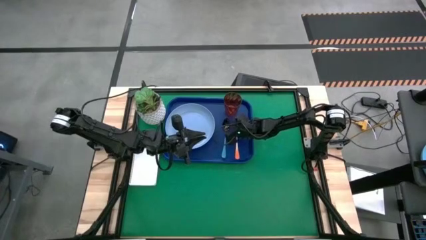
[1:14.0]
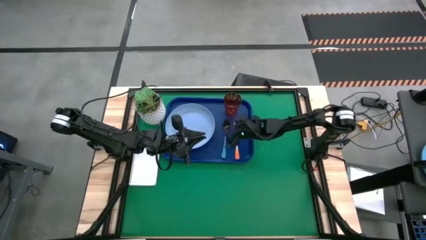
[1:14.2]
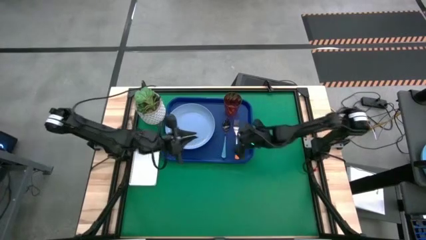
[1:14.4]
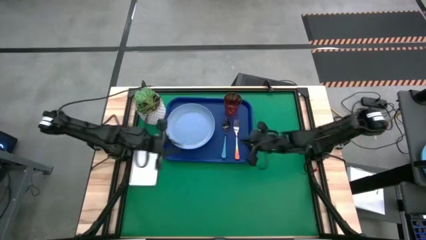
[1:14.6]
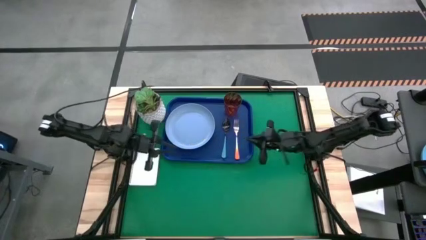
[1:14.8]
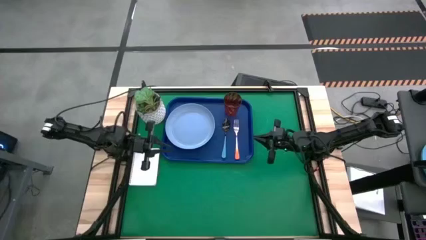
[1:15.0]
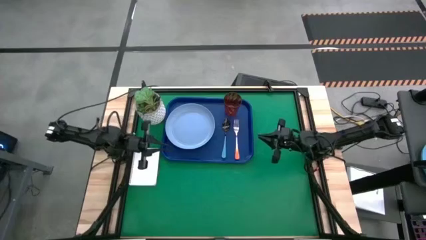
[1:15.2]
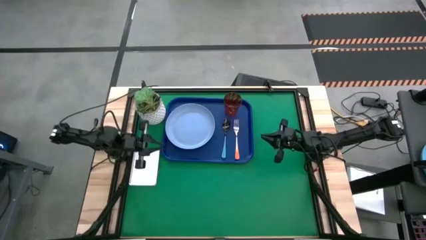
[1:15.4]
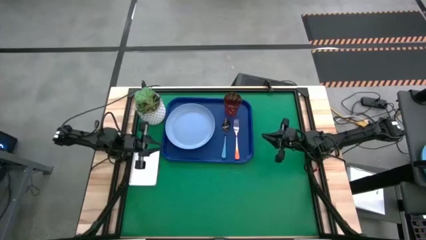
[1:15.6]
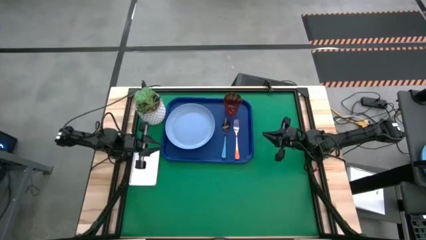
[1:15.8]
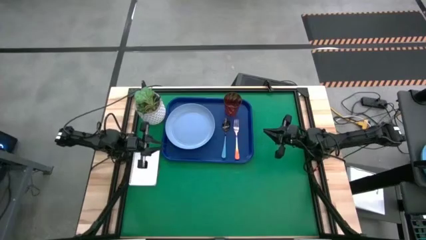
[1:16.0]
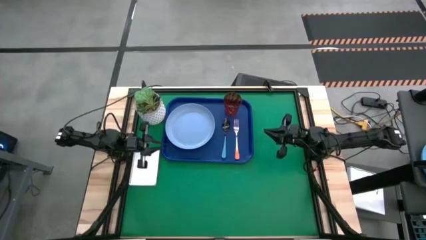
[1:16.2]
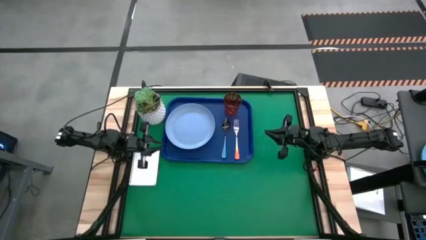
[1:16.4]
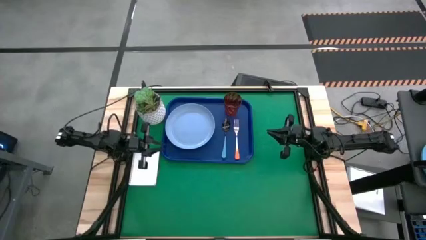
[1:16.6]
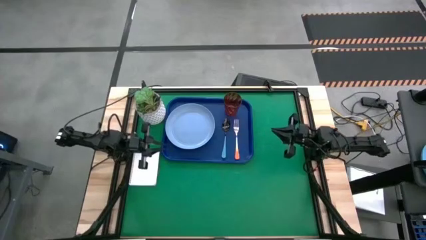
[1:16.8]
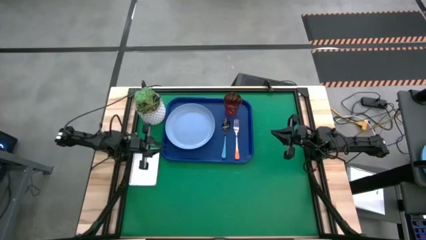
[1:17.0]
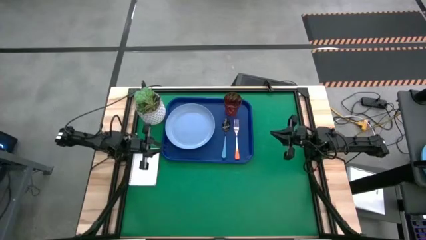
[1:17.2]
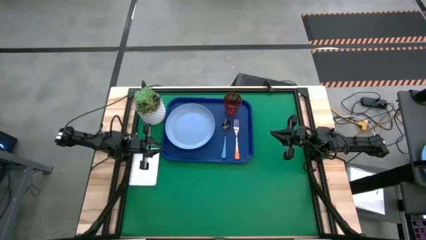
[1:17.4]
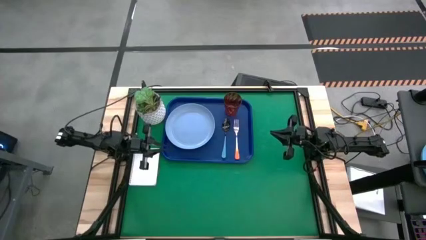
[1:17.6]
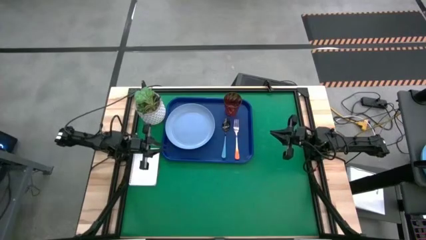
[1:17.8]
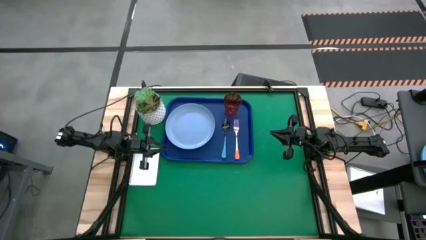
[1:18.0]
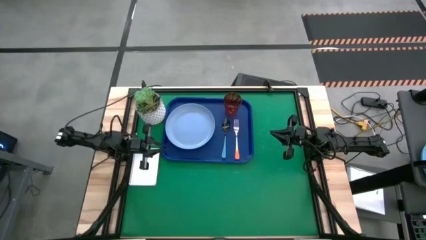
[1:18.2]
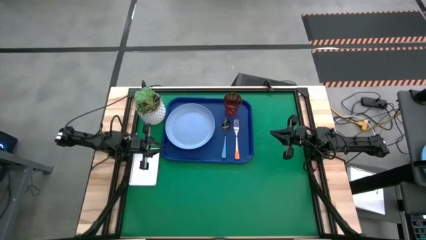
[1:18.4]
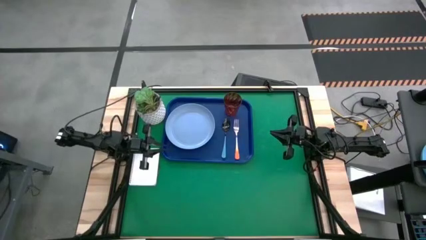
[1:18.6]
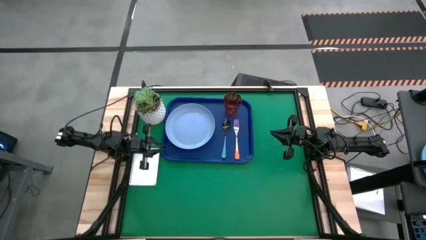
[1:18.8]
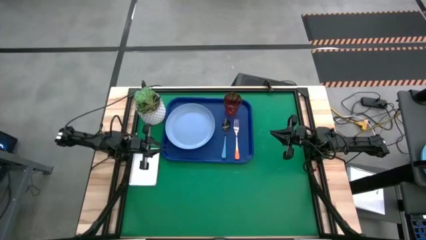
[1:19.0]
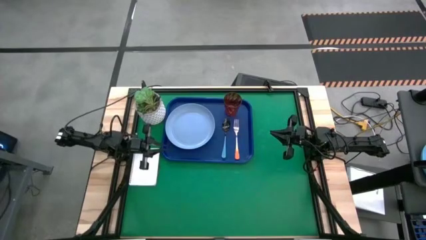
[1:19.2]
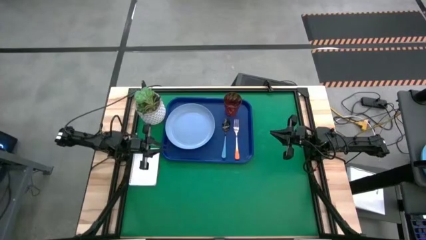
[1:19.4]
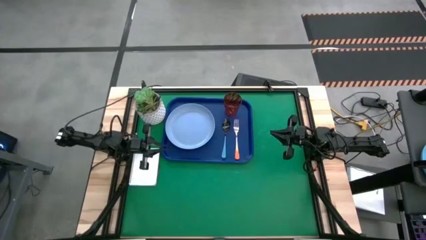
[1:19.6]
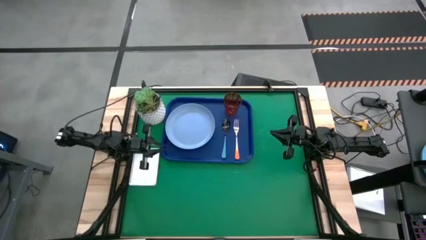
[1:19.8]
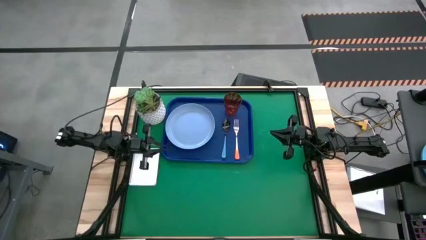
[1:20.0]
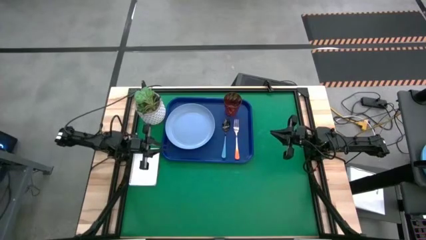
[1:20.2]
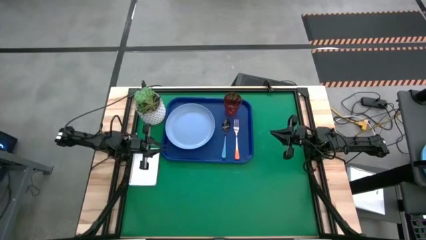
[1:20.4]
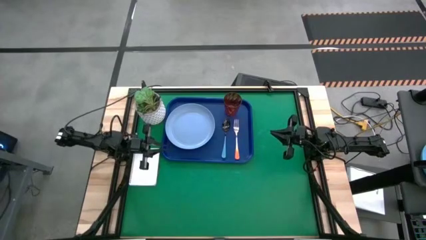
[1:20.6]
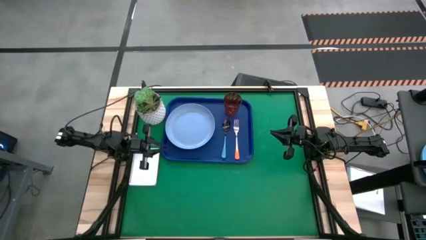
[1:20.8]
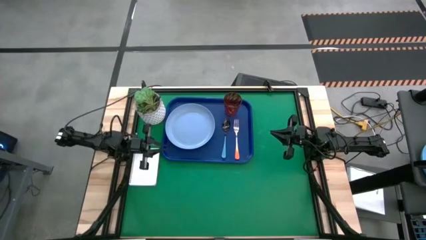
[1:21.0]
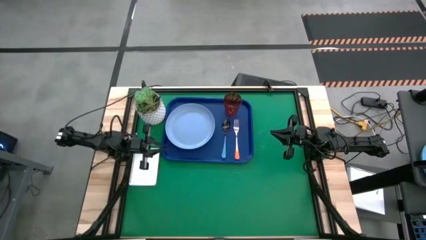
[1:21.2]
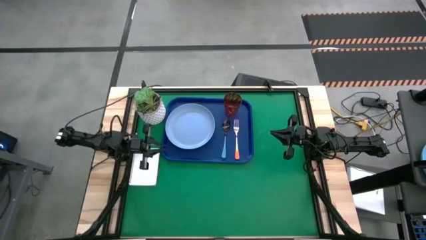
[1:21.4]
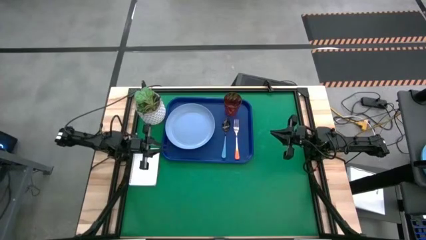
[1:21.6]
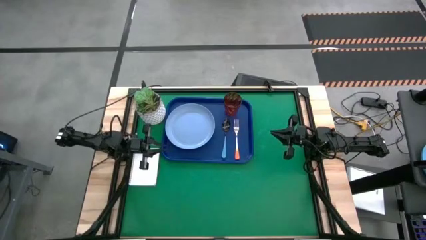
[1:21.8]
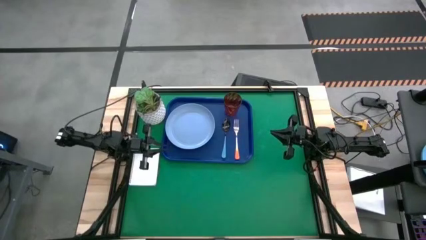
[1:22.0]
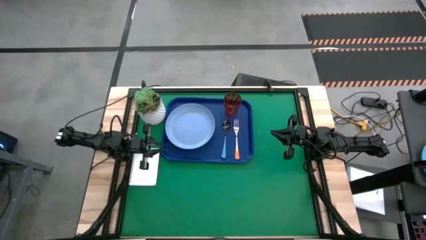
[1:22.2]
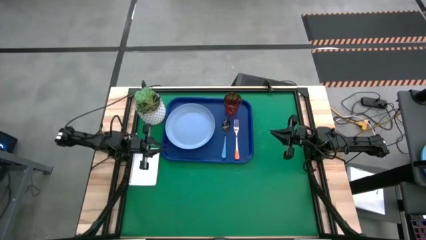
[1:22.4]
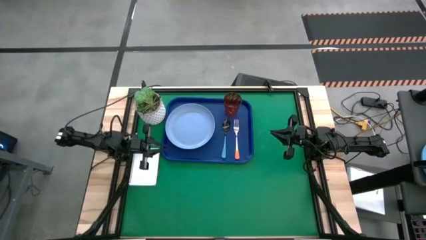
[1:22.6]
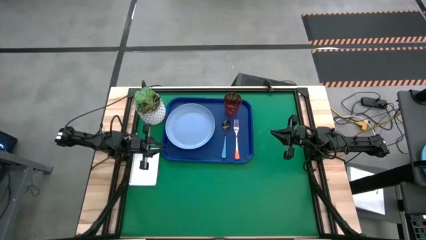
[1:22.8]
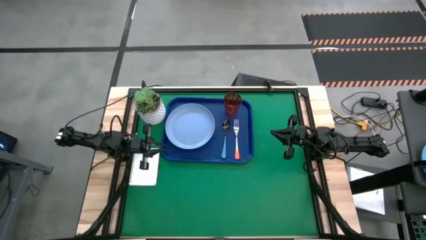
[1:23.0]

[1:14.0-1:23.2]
Task: Pick and place plate/cup/fork/spoon on tray
Return to Home Position

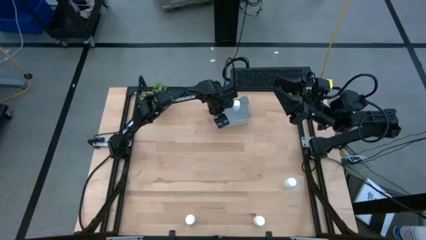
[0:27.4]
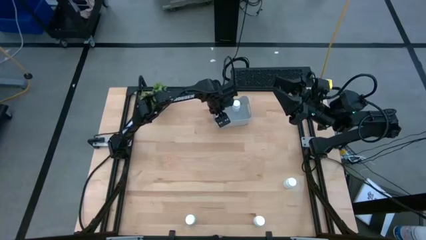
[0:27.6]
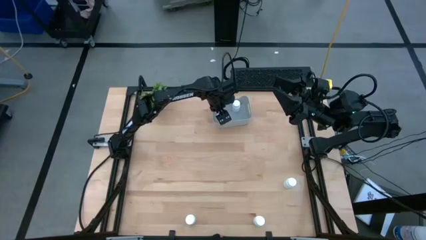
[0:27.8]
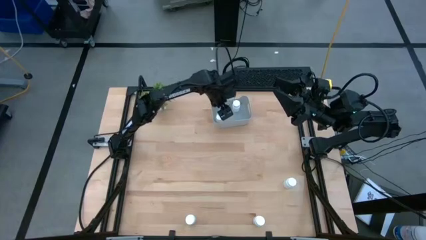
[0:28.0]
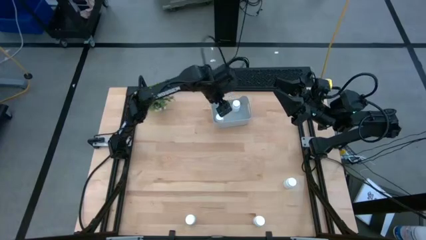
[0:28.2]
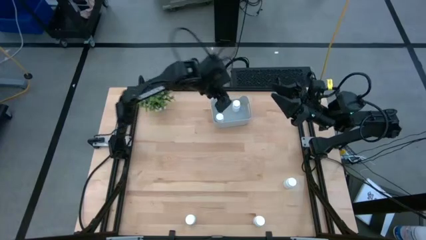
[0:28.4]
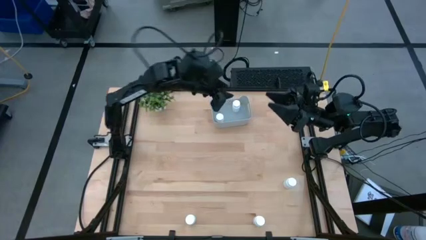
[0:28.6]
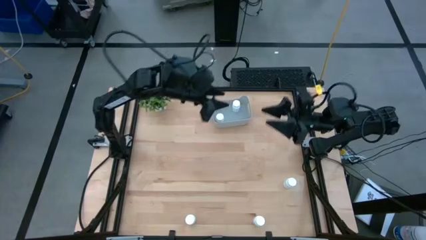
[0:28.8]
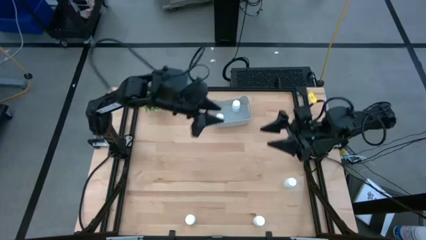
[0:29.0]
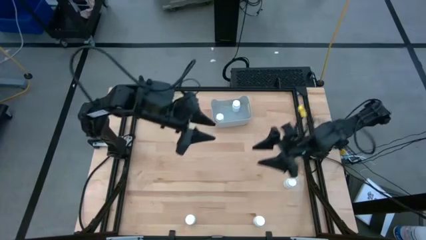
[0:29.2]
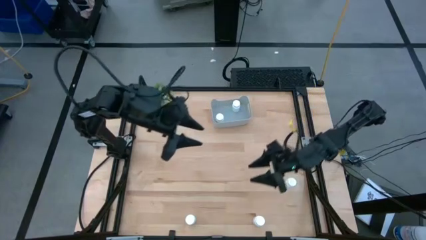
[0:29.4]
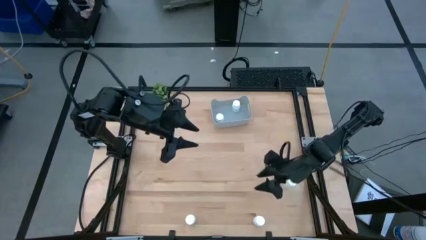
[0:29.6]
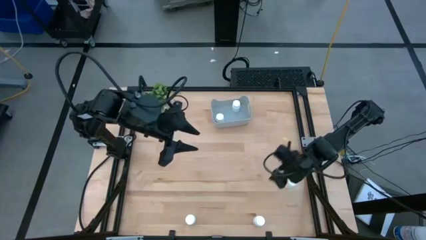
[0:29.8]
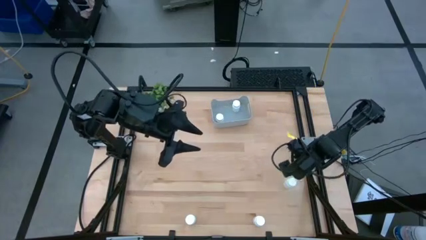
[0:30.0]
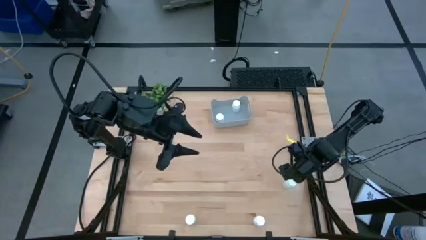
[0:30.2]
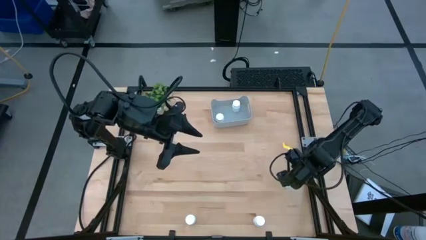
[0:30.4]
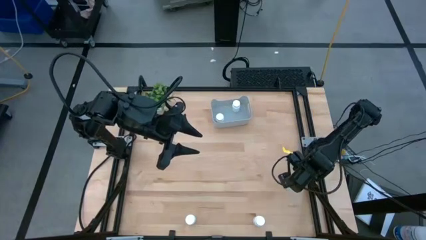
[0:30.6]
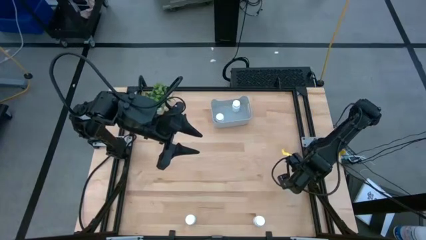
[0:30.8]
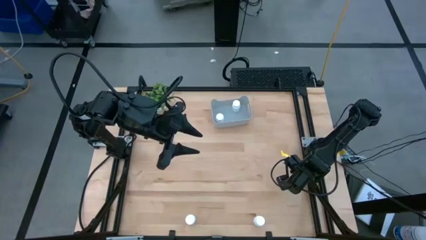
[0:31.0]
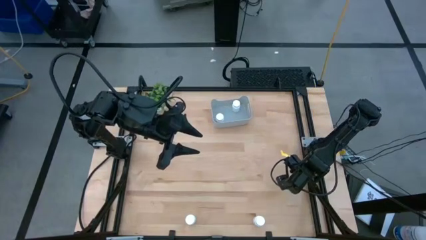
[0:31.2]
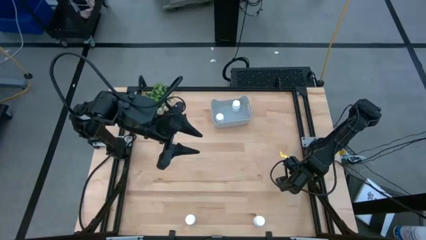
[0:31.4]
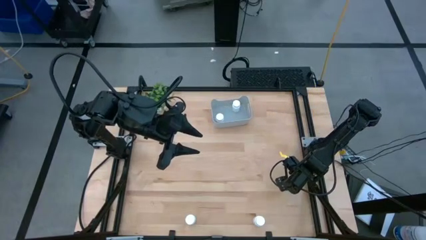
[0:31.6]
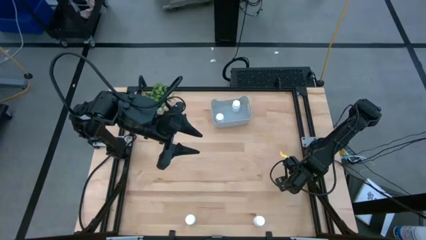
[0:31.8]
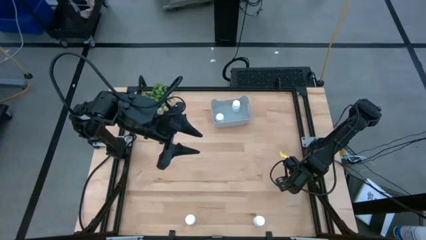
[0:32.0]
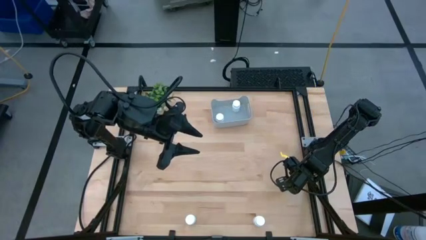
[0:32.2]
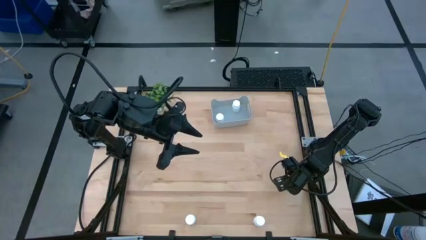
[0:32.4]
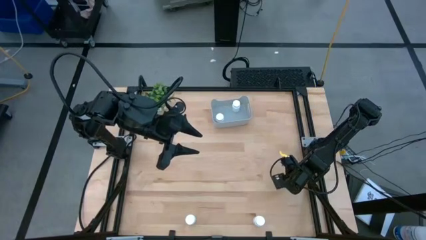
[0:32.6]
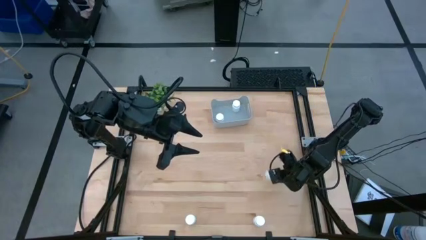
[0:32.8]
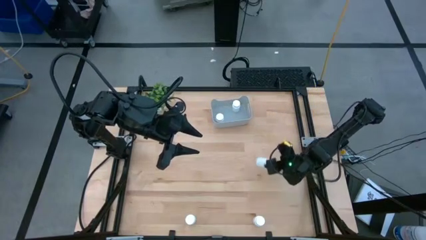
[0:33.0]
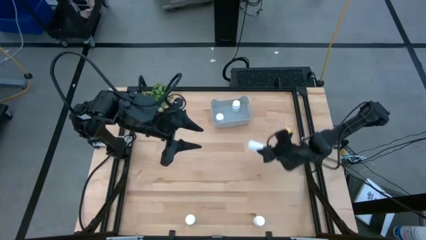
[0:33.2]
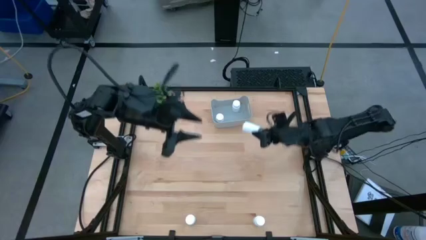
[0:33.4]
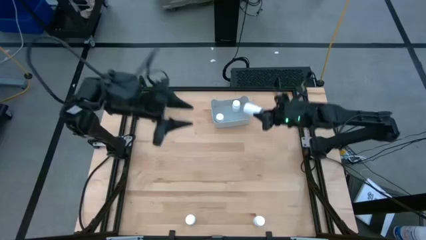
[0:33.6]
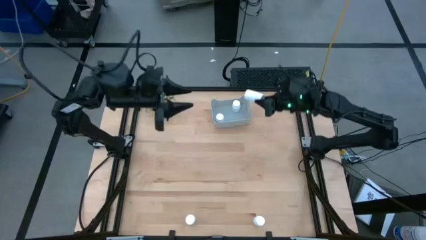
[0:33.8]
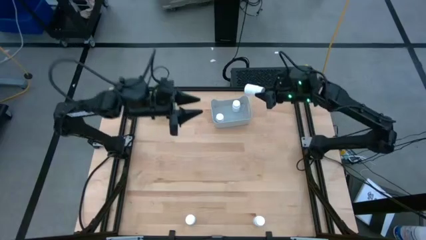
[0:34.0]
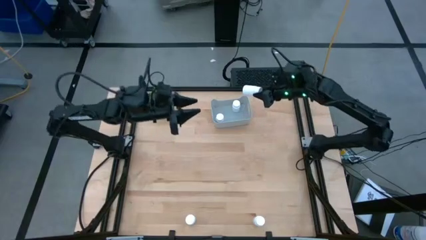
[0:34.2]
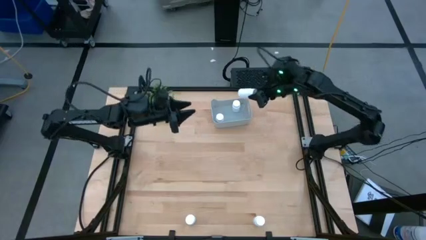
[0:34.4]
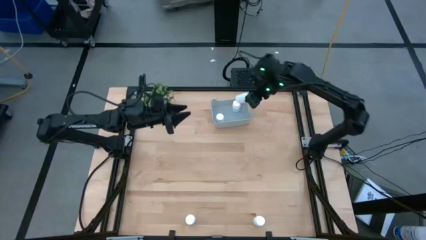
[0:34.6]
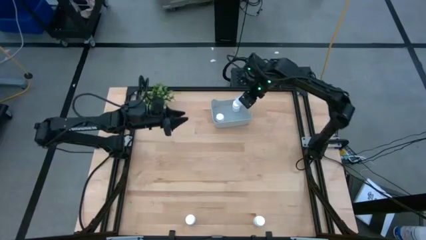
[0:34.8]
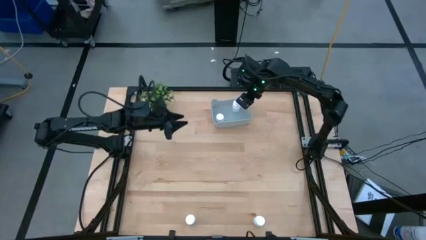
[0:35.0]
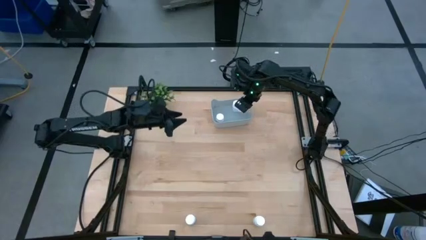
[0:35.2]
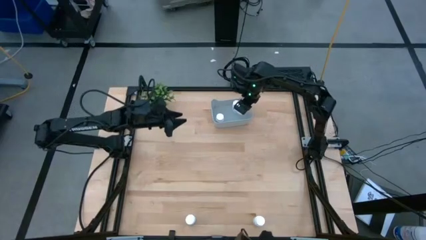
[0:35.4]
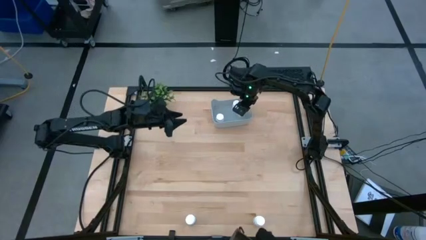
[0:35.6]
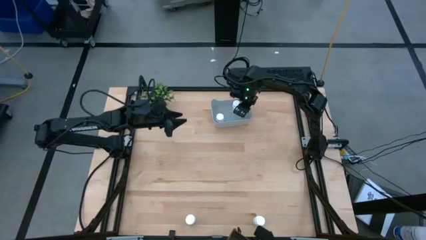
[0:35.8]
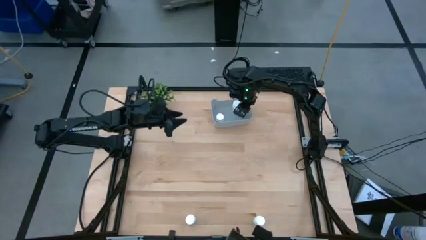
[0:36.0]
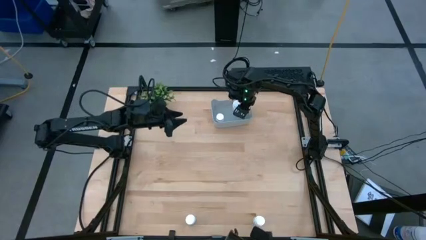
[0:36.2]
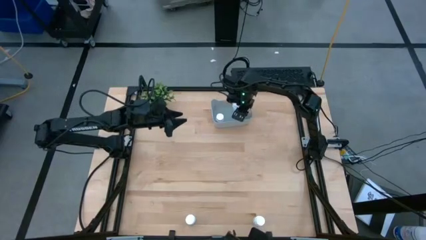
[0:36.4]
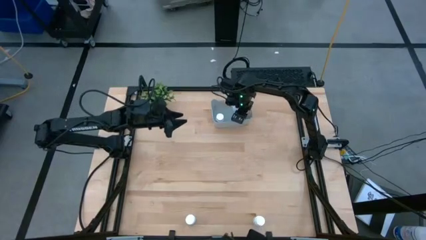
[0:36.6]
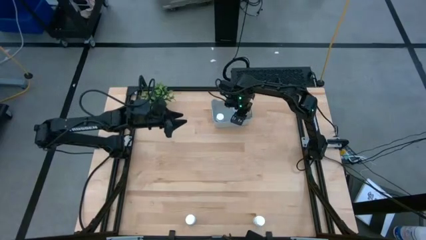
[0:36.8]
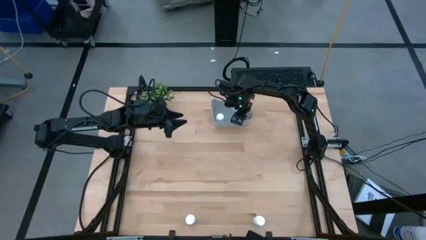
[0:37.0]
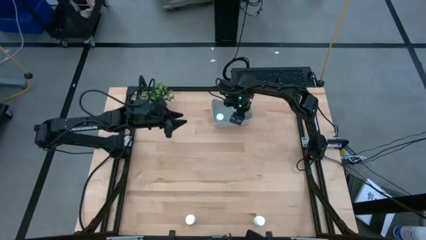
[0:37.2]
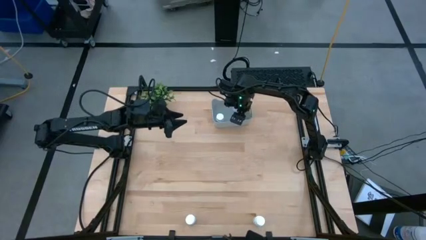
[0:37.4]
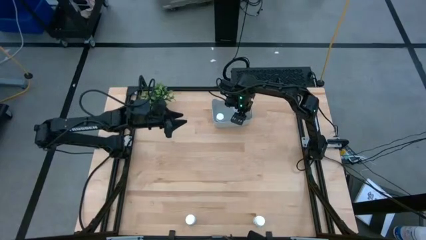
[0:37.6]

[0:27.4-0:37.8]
Task: Pick and place pill bottles into a basket
Put the white pill bottle into the gray container
